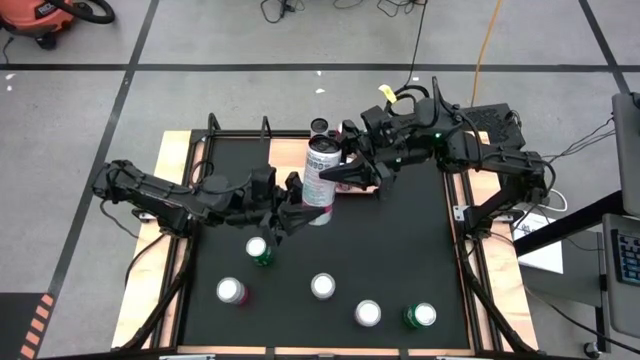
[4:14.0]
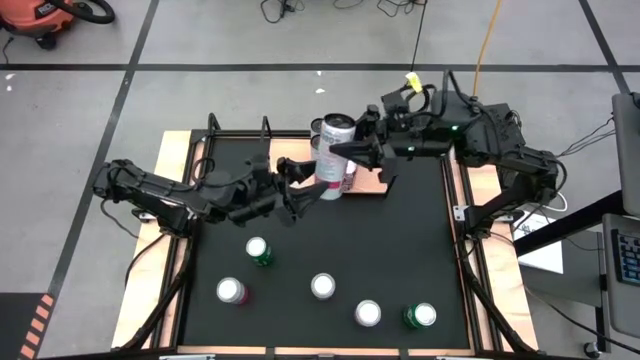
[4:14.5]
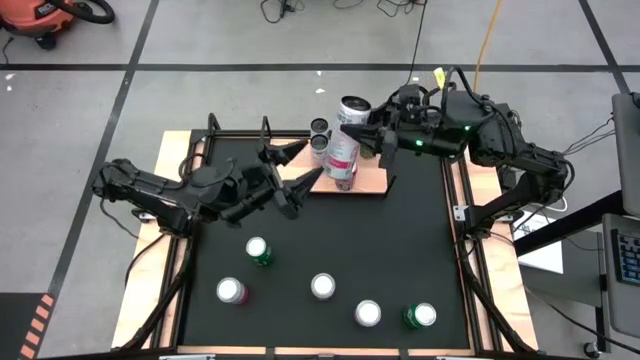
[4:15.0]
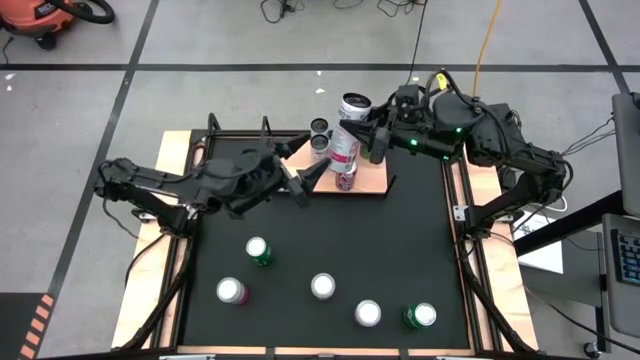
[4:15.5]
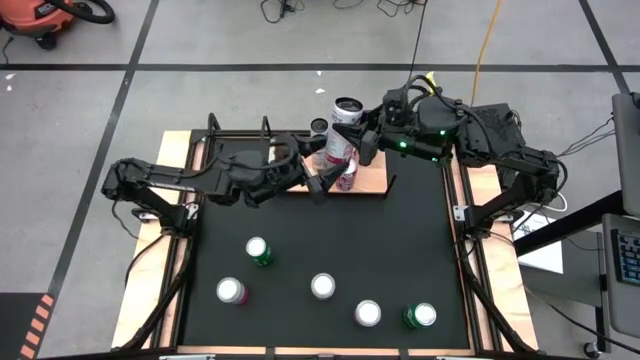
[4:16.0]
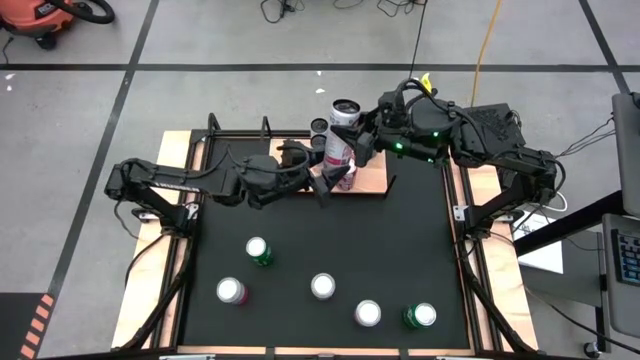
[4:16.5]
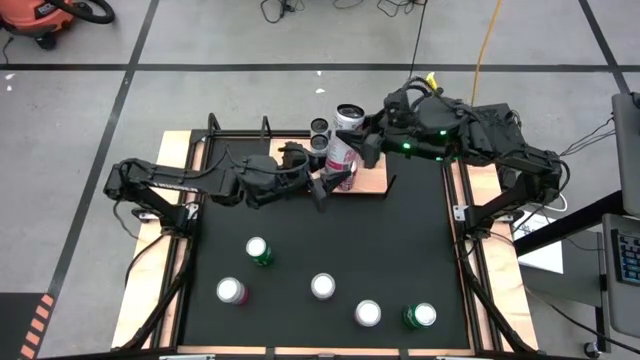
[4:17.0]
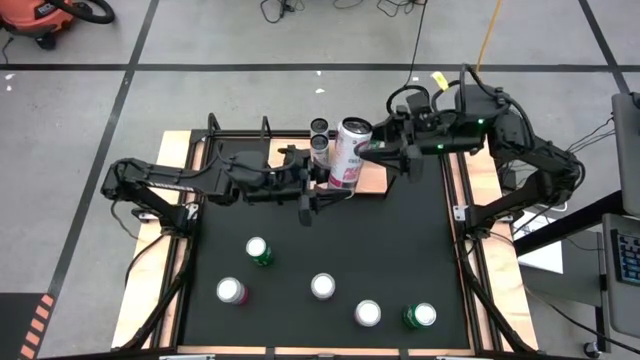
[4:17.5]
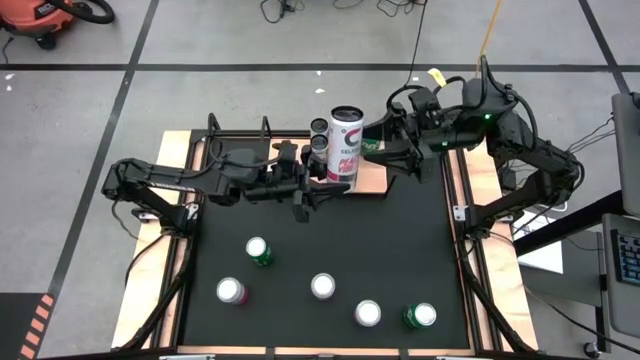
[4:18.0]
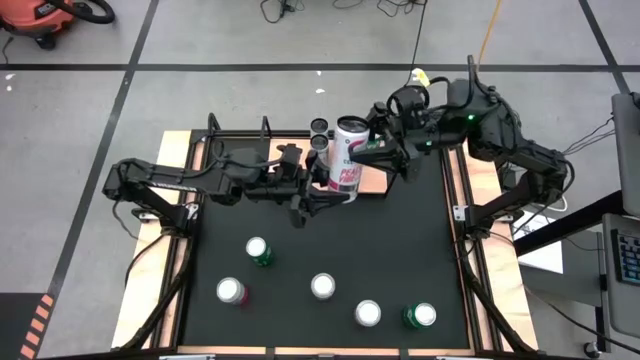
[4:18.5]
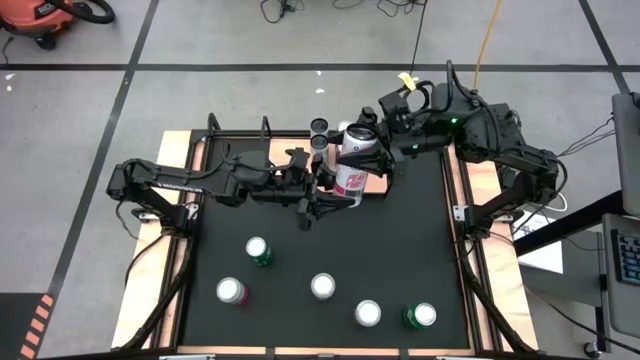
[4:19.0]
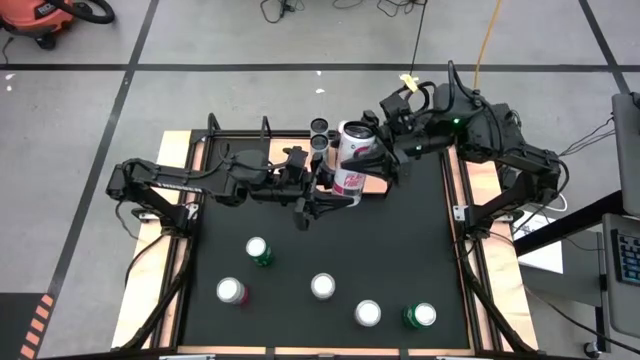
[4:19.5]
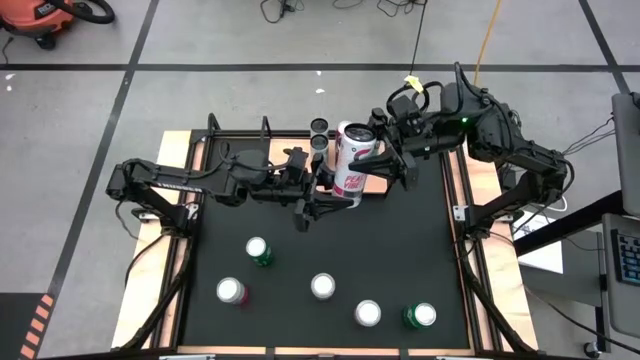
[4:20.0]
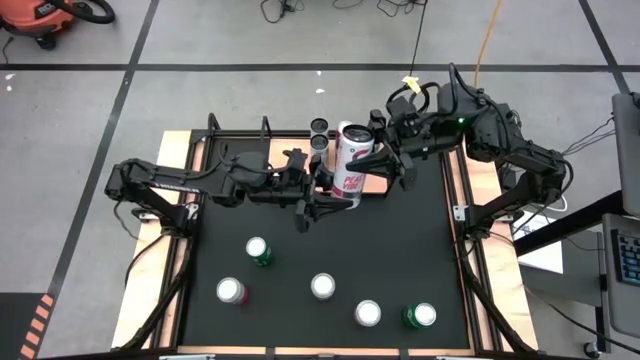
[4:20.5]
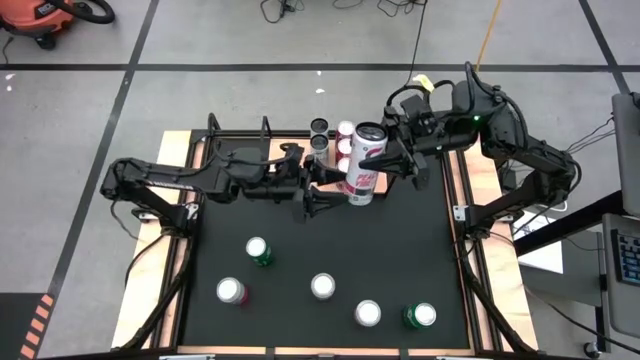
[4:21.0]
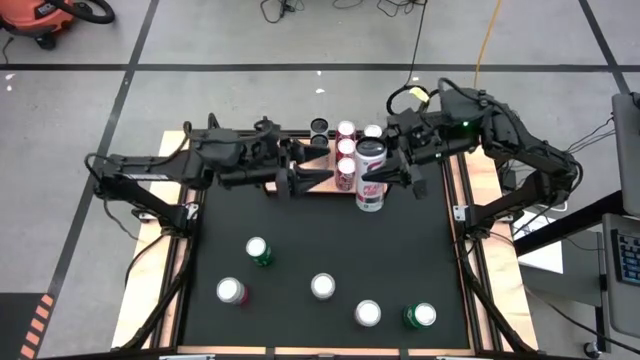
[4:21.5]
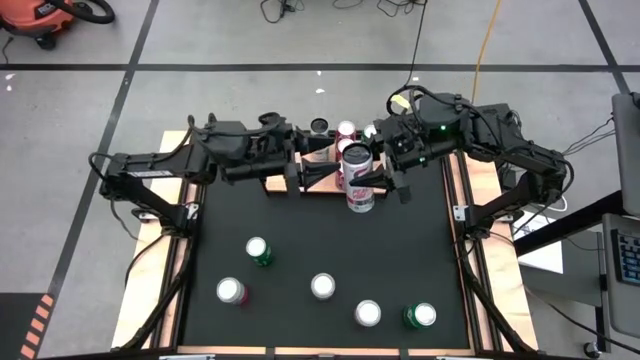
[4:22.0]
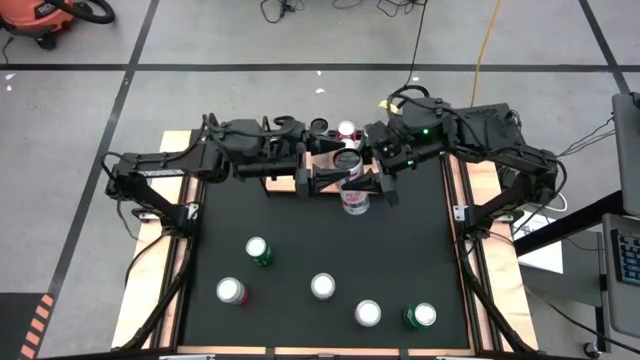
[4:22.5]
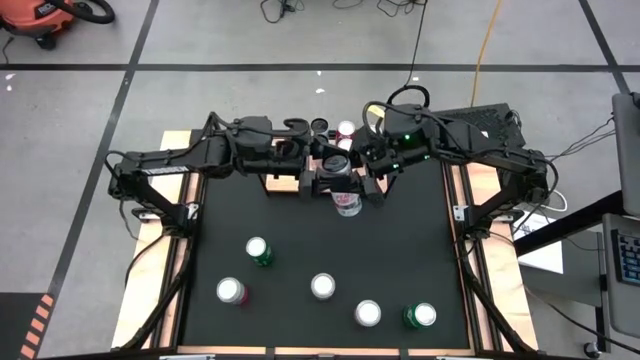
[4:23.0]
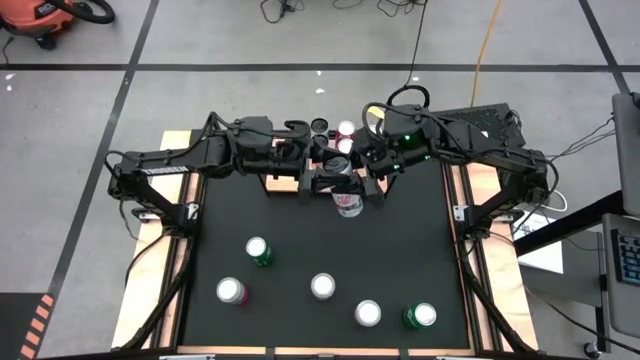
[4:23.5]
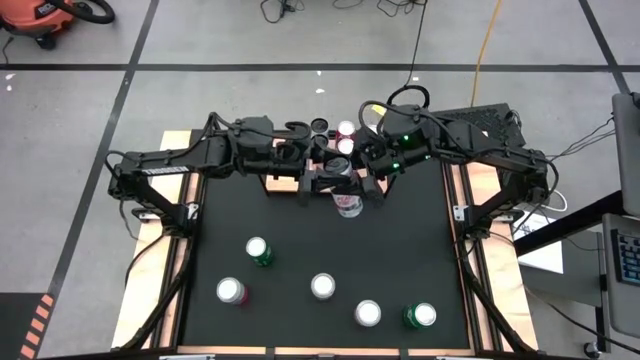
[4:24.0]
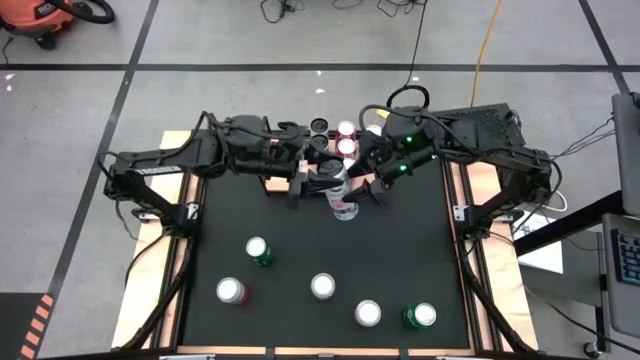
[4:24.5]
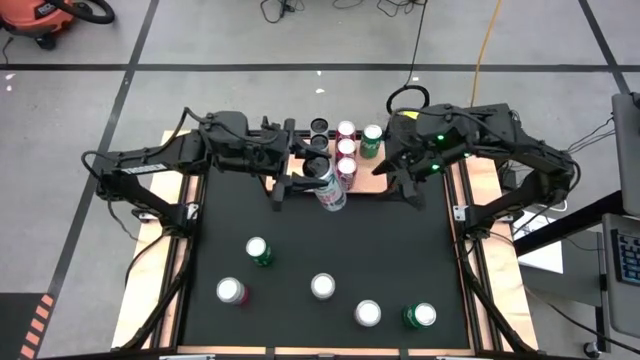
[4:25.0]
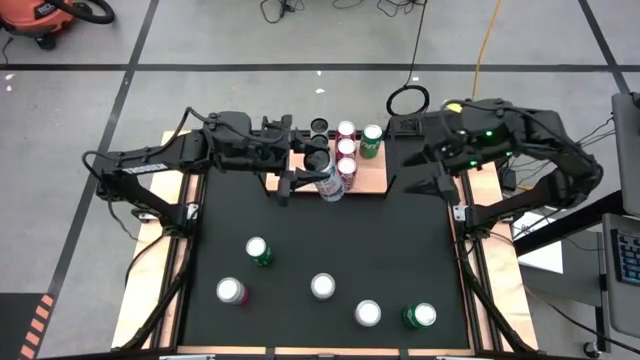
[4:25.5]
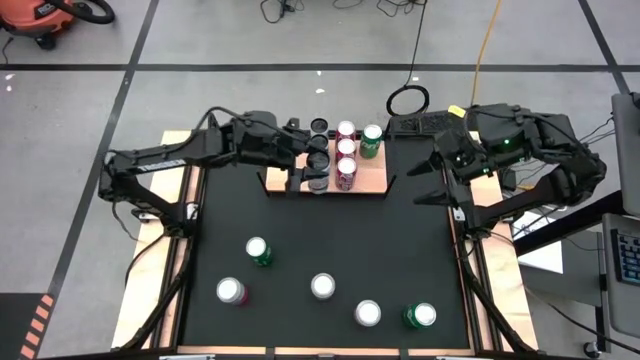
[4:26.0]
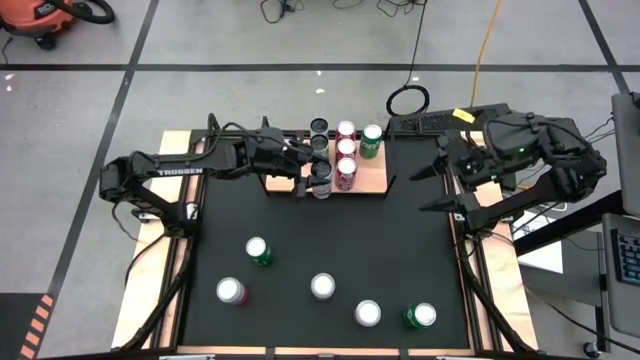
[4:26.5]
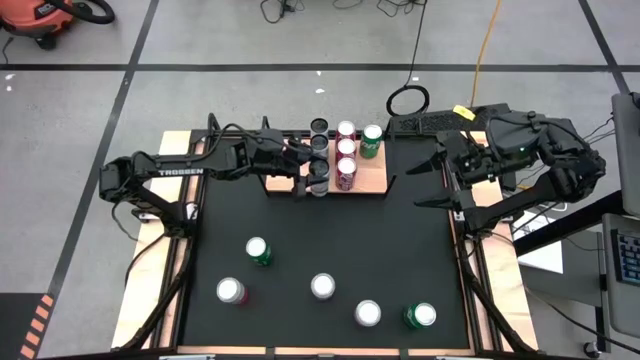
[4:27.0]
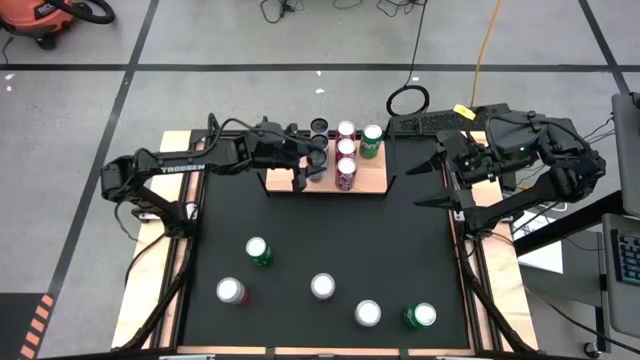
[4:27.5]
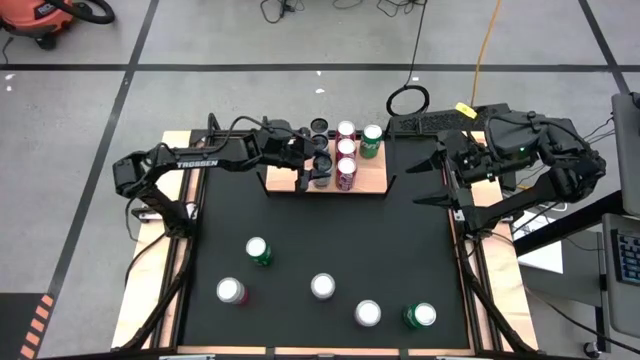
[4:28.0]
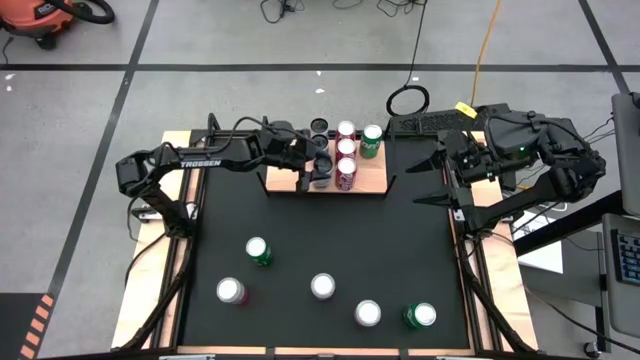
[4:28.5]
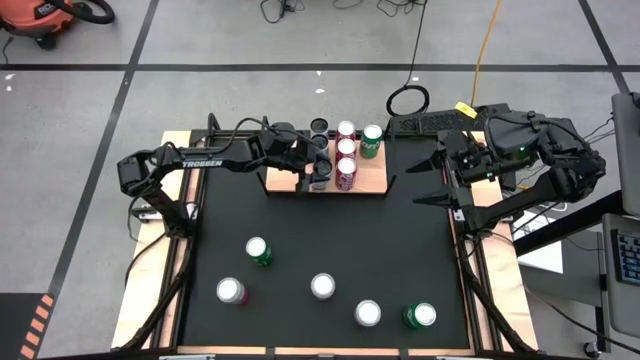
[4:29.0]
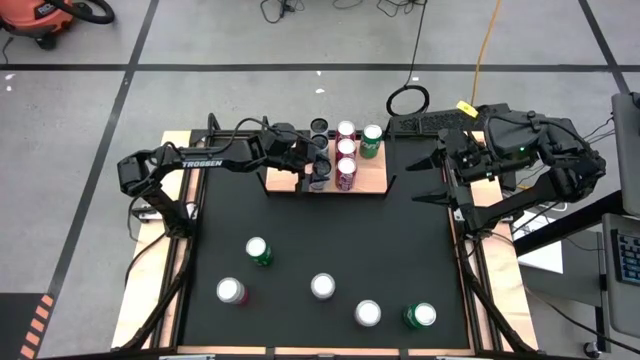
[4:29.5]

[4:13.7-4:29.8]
Task: Place canned beverage on shelf
Put the white soda can on the shelf

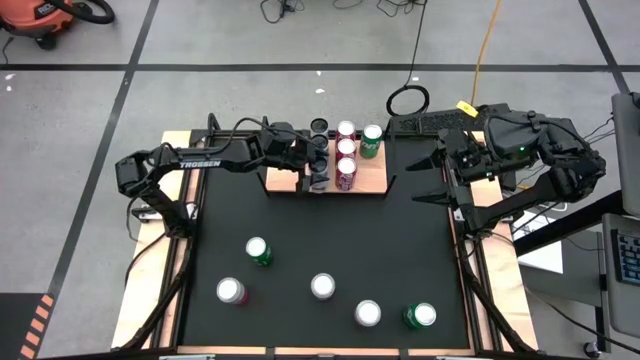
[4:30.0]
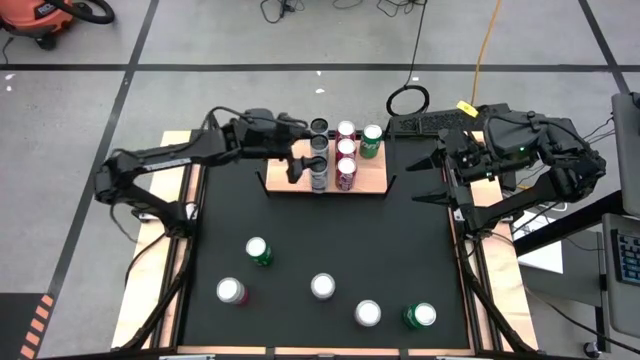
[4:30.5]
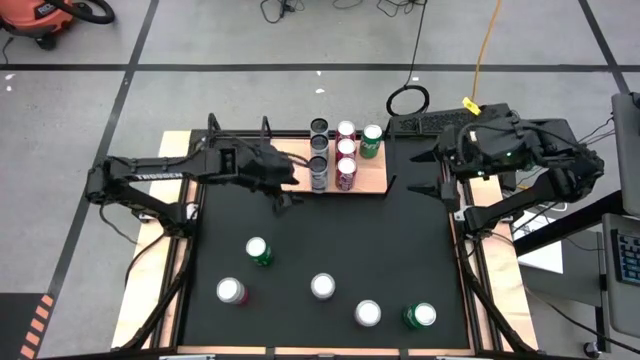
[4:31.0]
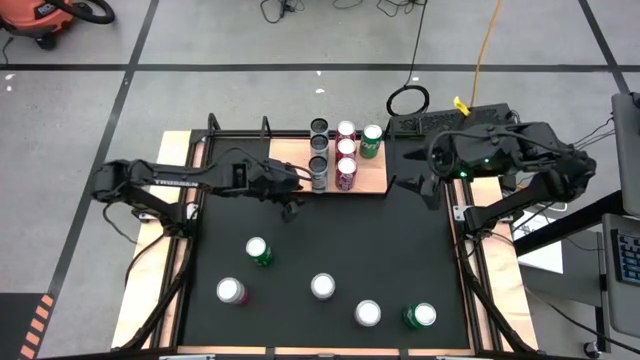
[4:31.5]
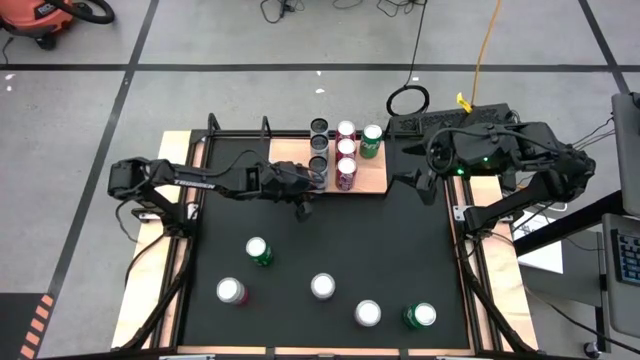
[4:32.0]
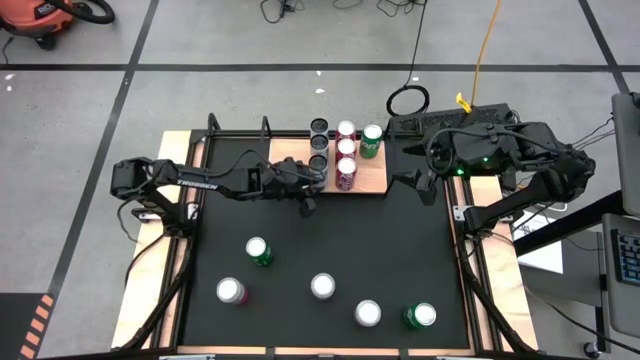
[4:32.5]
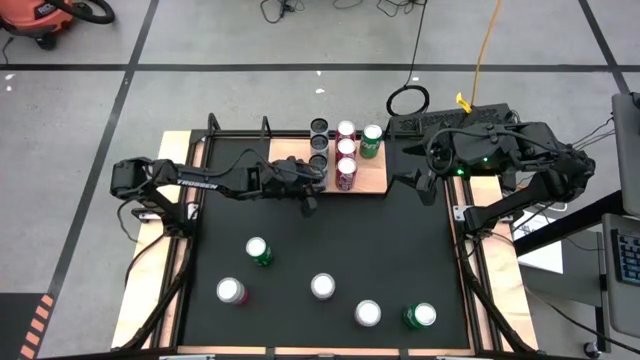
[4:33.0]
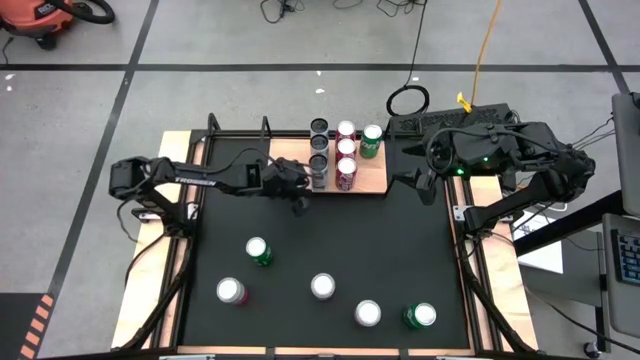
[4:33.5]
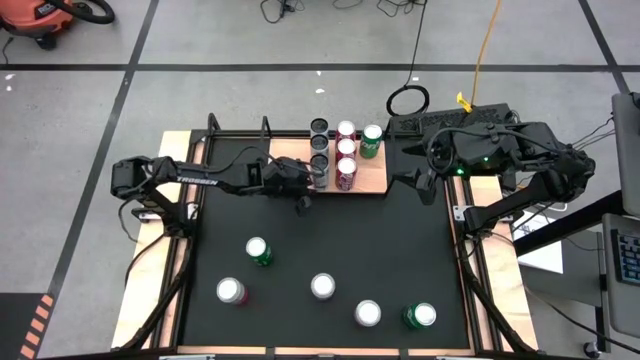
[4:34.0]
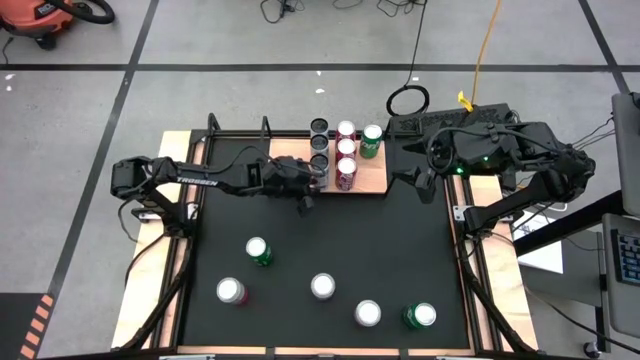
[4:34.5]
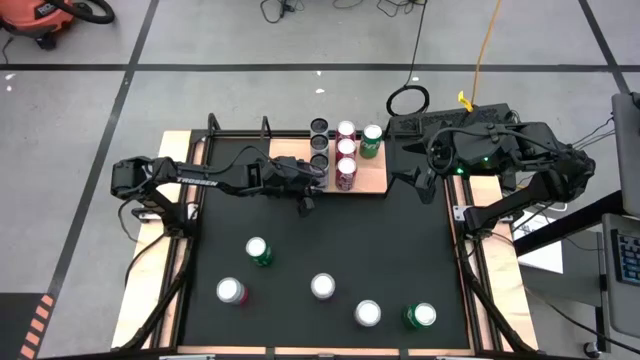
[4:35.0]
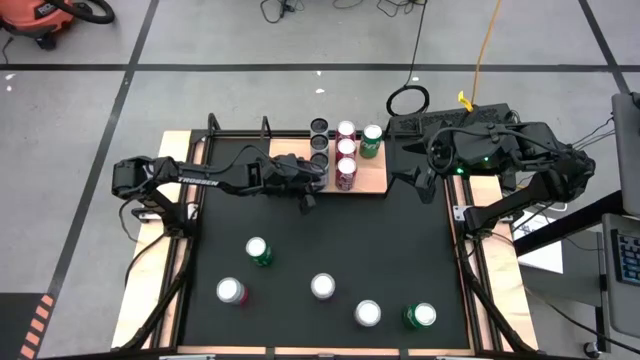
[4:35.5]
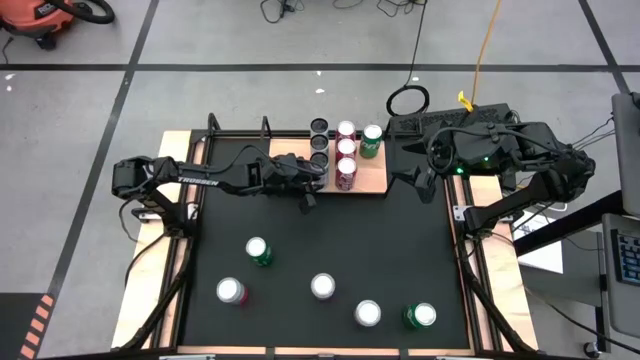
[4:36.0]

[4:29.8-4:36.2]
Adjust the white soda can on the shelf
